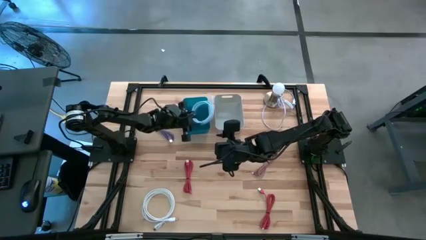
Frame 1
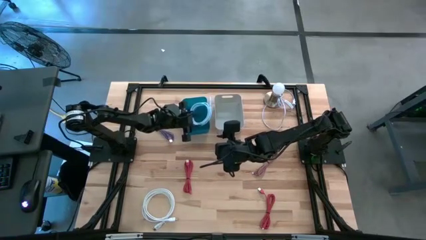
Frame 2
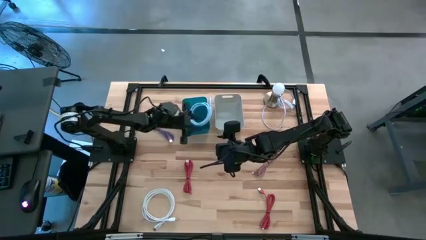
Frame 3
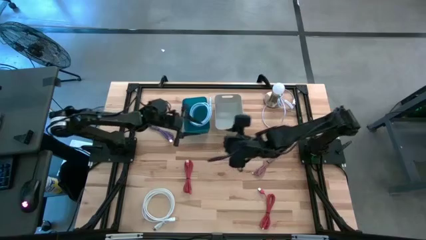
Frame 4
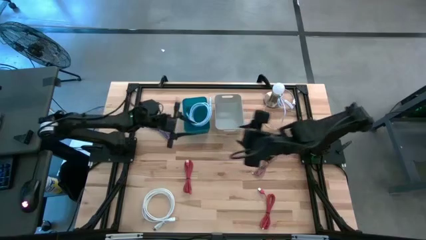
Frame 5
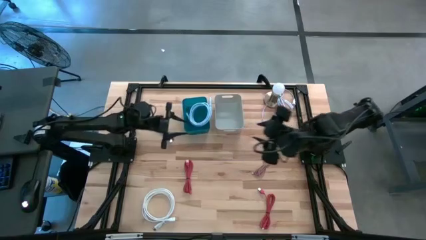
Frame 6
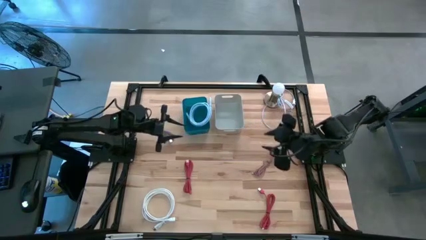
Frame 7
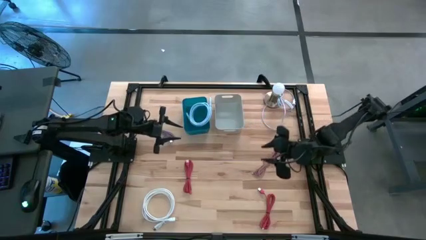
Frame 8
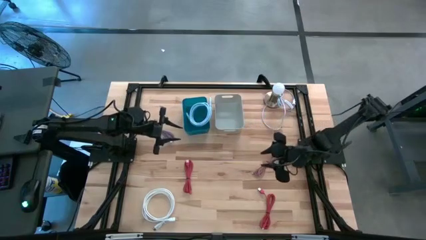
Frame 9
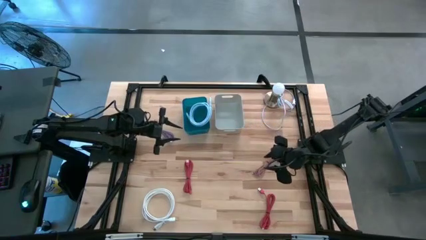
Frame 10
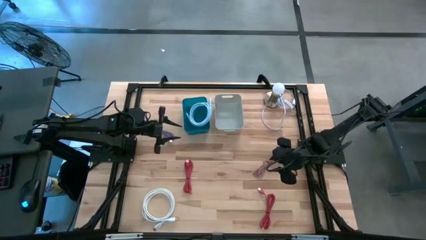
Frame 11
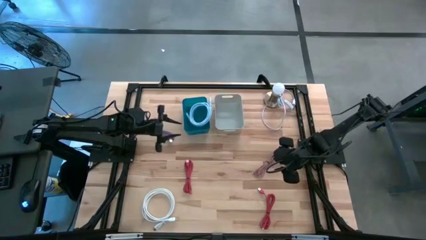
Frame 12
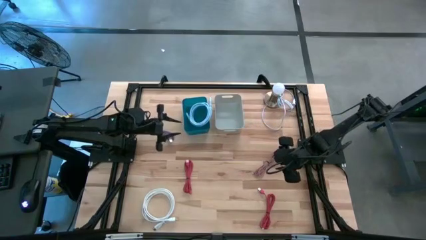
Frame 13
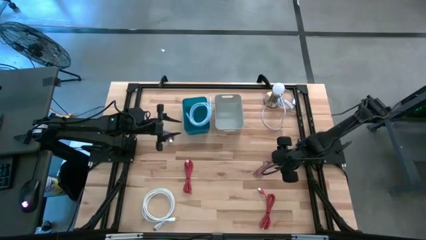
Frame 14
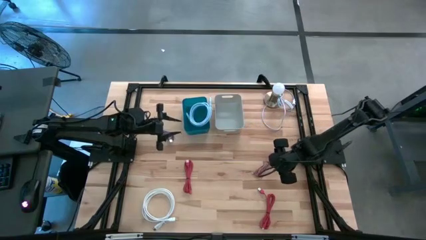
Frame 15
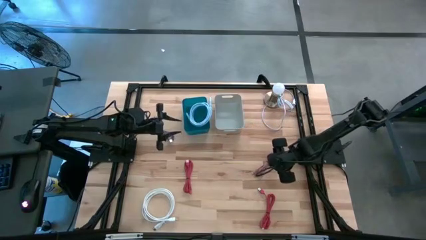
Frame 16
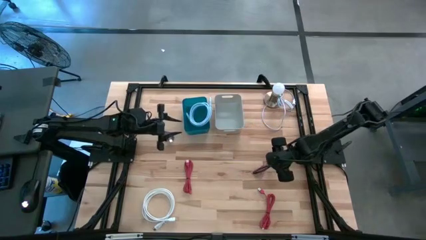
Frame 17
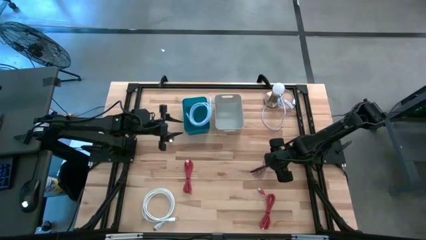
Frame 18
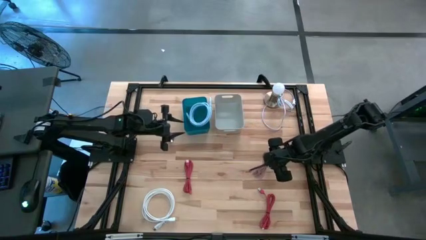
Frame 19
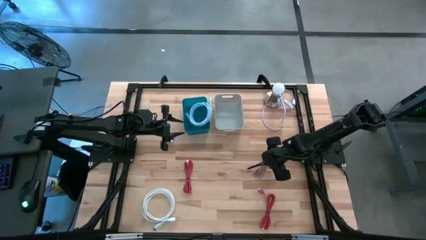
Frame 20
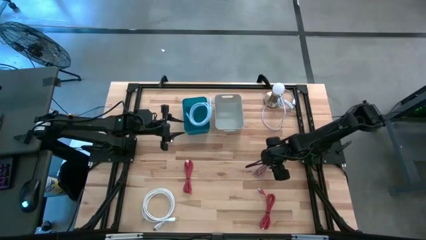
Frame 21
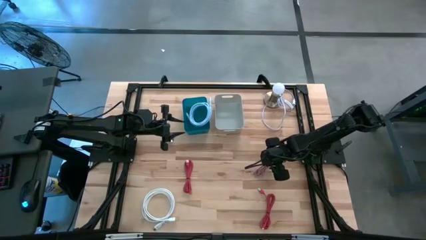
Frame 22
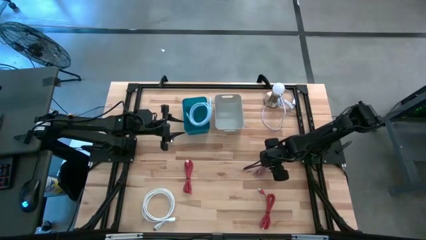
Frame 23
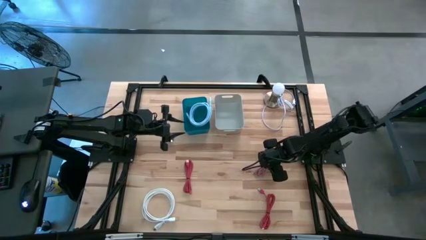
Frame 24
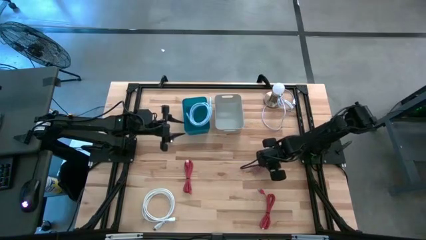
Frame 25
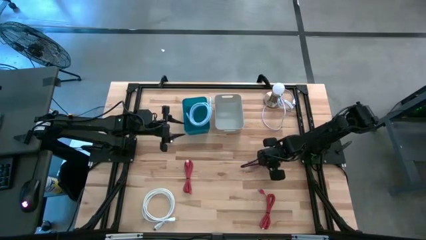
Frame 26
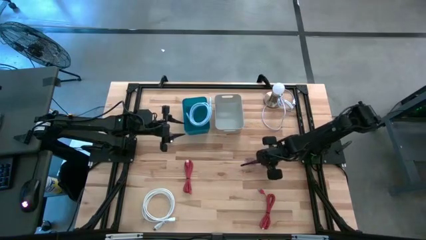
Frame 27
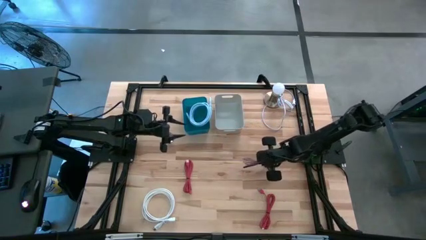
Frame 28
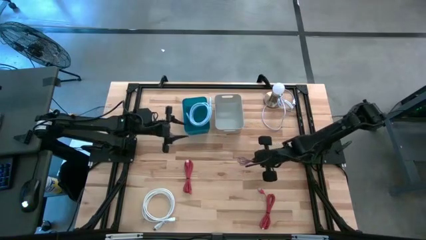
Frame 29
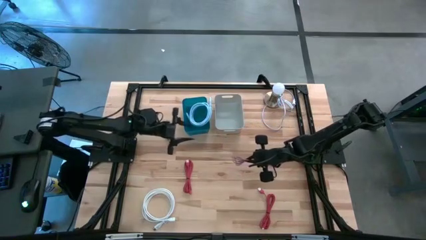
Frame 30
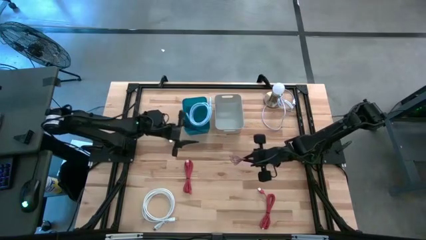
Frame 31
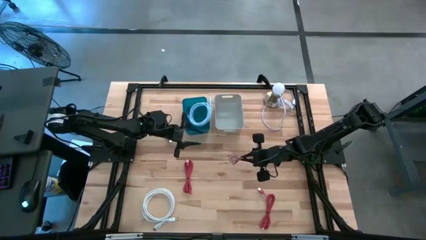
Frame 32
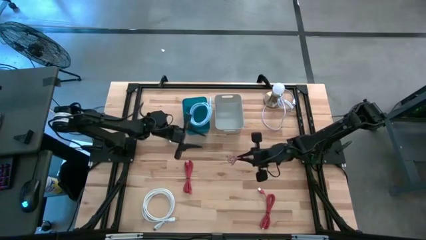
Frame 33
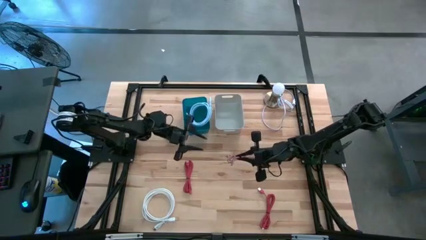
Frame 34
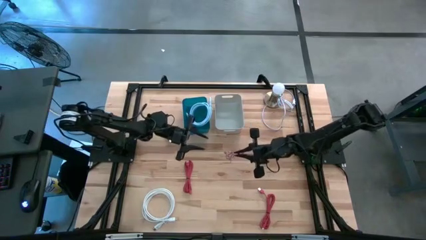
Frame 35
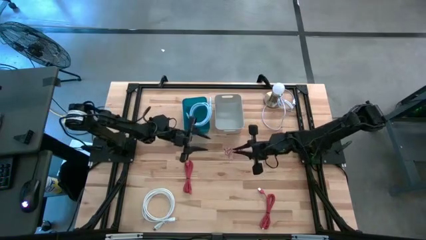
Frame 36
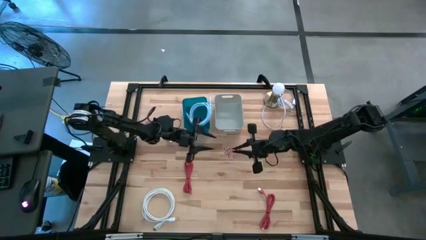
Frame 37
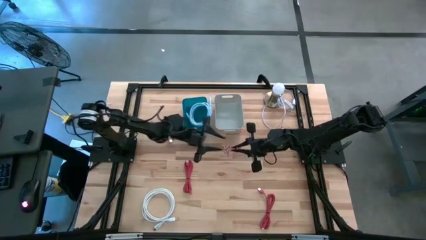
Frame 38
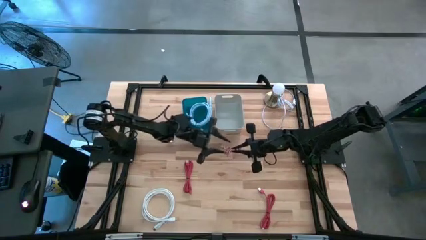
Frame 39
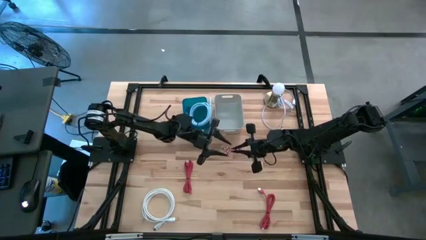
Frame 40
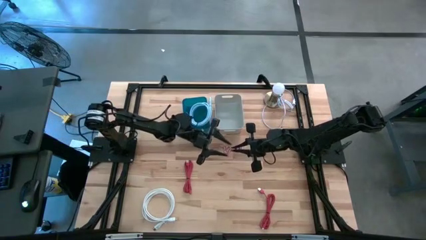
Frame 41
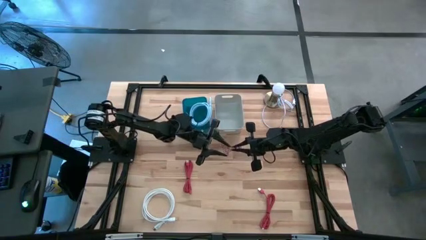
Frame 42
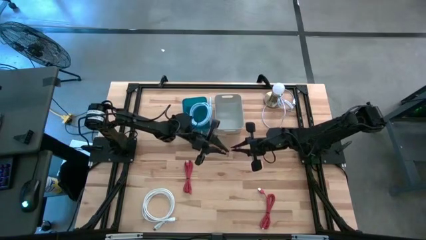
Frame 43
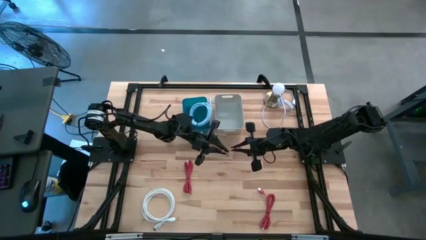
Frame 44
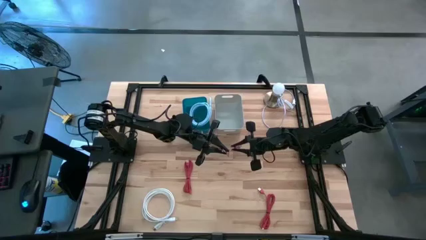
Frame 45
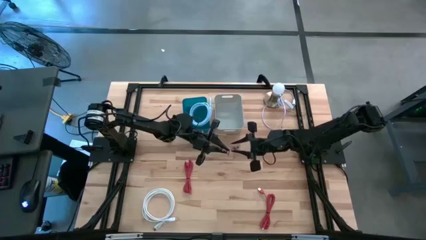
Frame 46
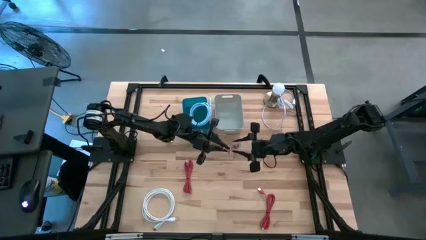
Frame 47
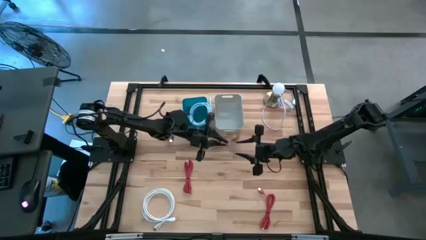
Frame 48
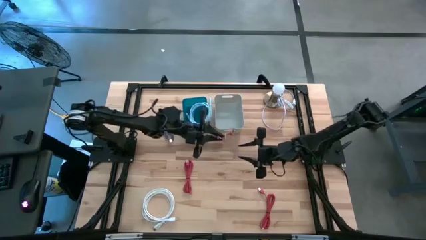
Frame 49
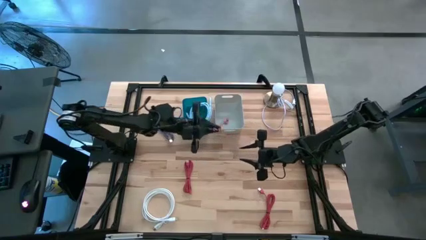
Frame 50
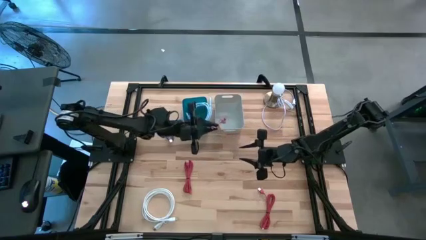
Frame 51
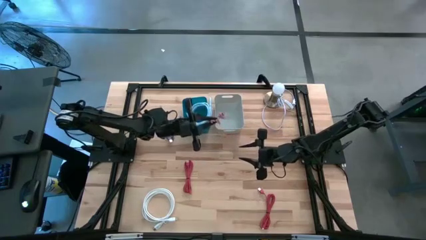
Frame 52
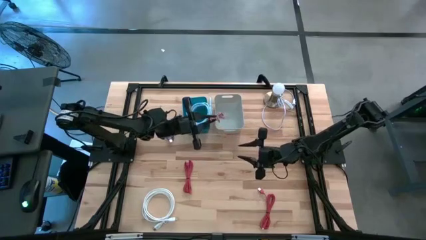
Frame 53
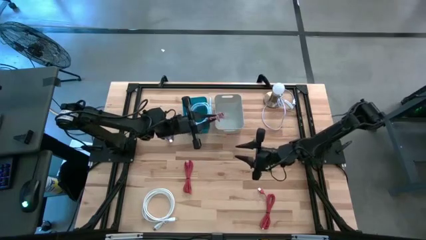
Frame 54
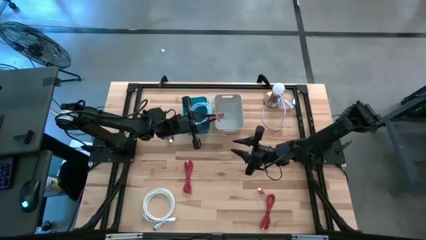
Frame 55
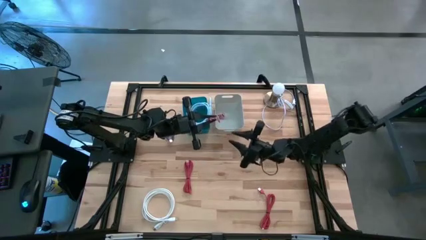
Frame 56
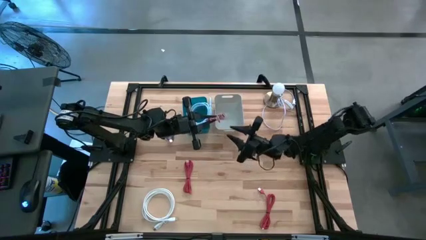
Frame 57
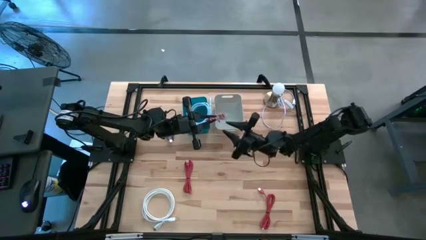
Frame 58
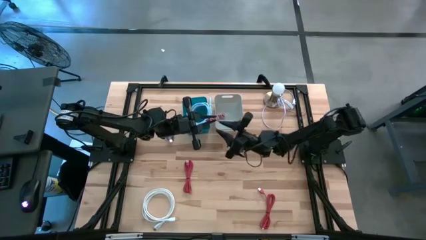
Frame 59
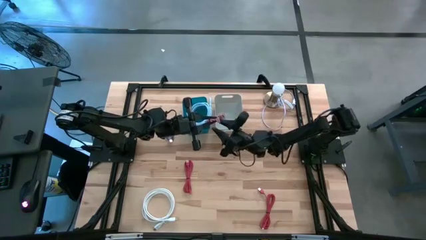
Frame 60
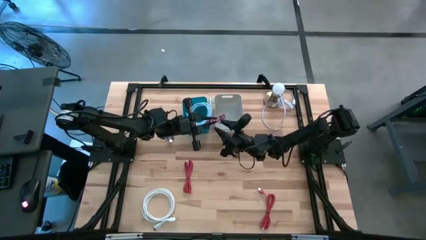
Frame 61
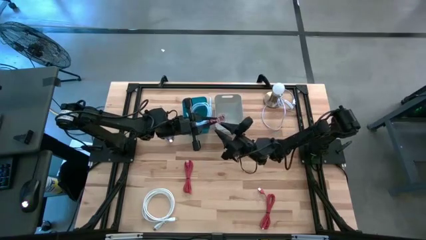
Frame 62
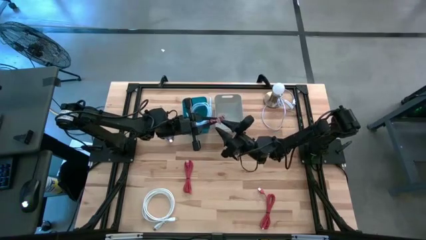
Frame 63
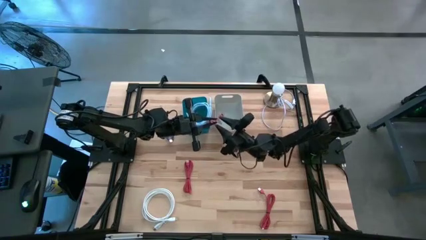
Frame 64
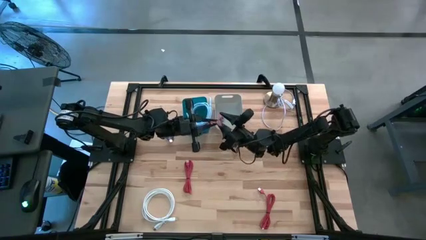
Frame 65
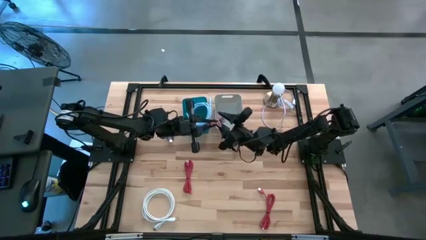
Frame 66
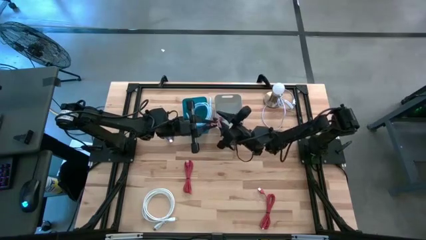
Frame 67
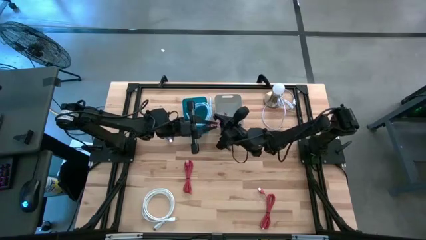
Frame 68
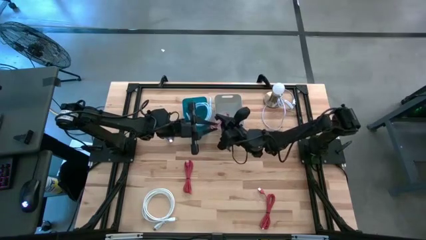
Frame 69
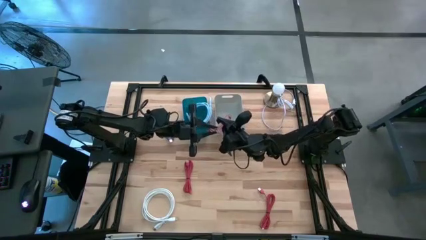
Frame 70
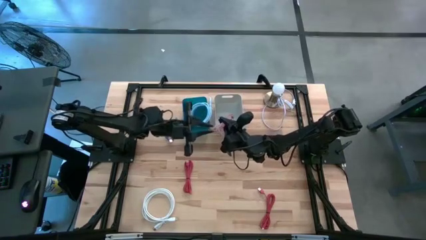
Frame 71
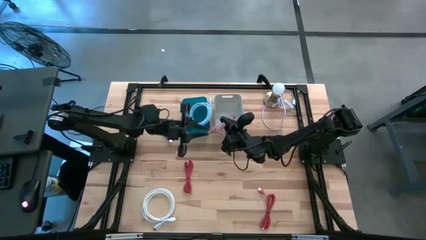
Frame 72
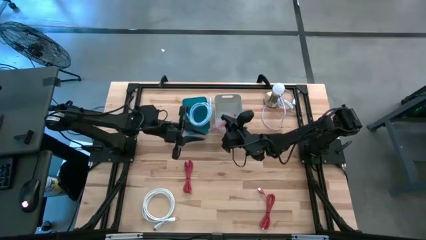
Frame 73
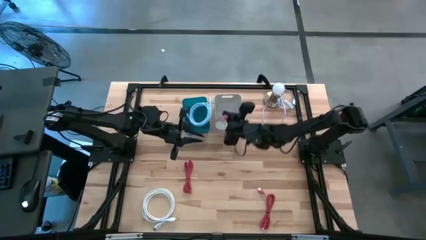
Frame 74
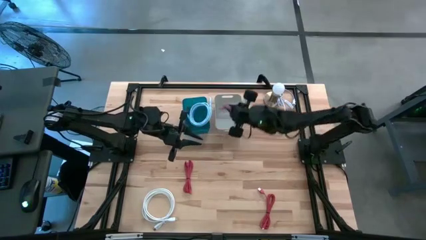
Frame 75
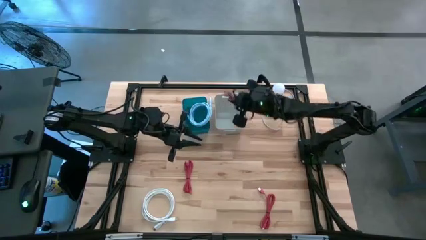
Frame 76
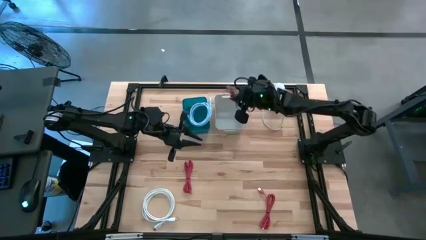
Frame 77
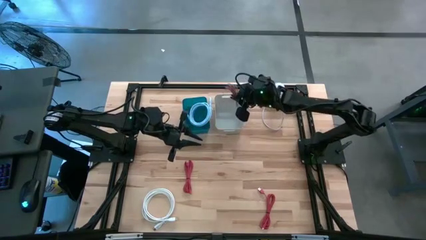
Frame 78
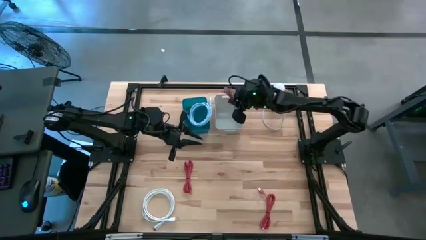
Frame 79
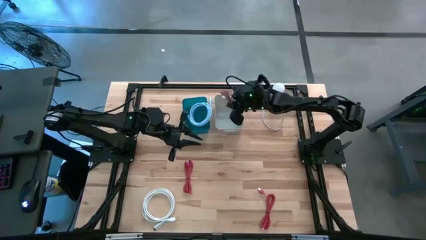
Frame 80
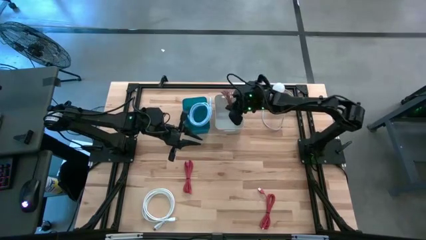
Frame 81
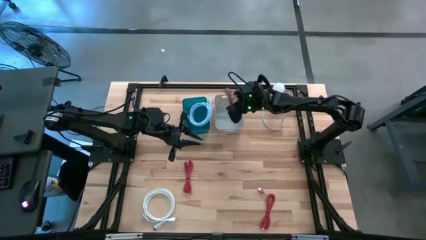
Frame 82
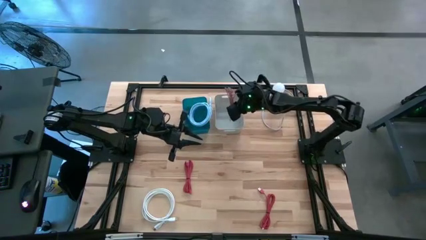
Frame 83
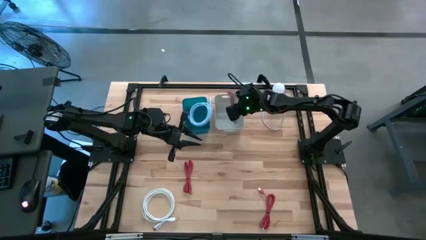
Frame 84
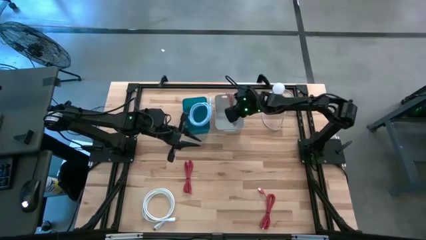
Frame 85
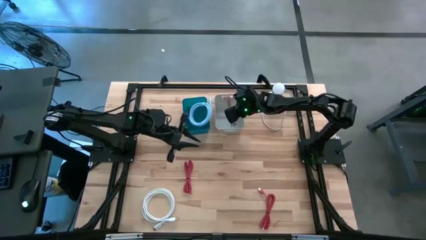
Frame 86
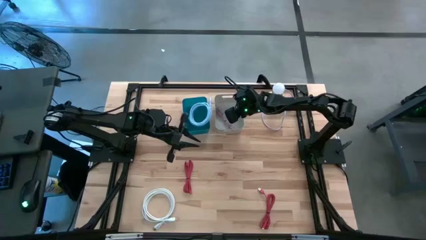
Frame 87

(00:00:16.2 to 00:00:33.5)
Task: Pick & Place USB Port
Put the brown charger cable into the gray bin
